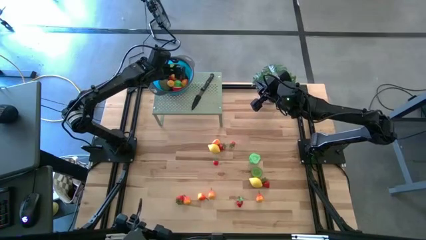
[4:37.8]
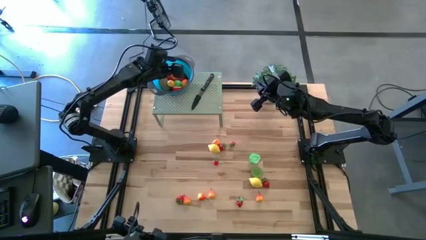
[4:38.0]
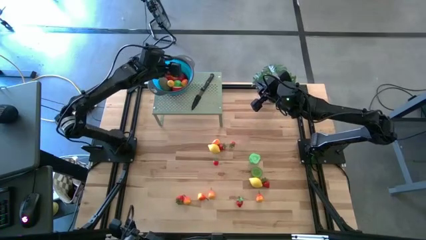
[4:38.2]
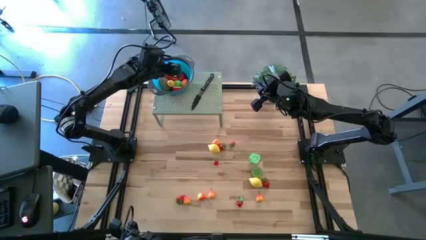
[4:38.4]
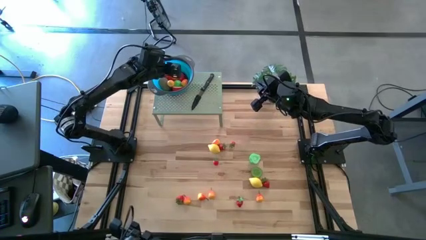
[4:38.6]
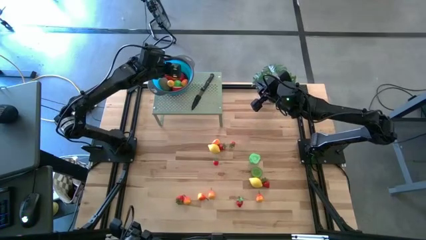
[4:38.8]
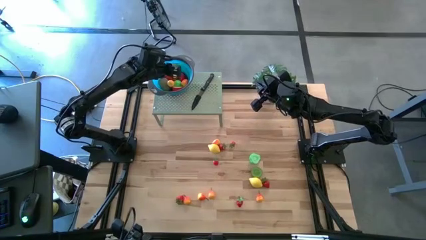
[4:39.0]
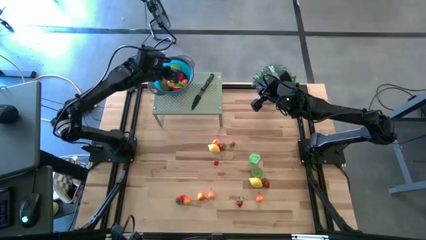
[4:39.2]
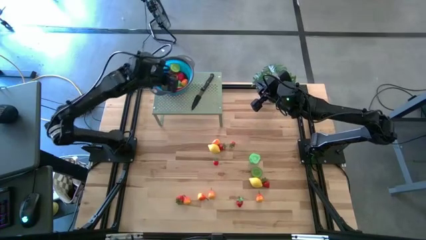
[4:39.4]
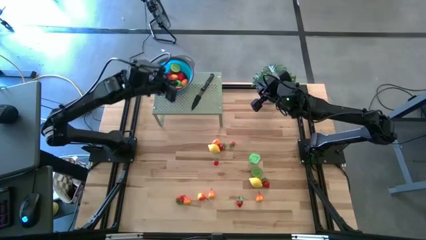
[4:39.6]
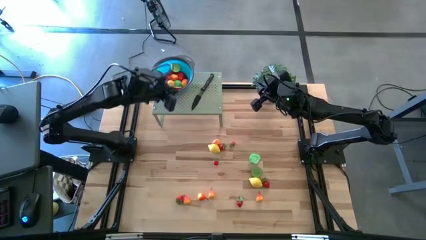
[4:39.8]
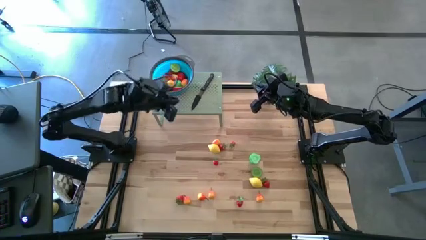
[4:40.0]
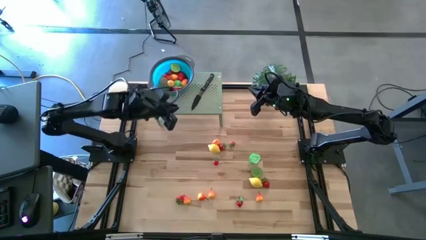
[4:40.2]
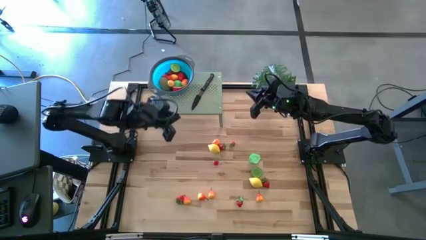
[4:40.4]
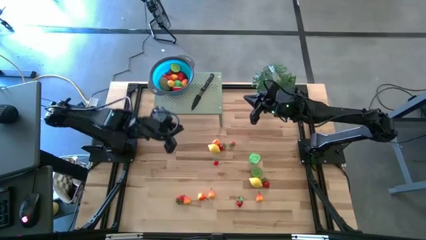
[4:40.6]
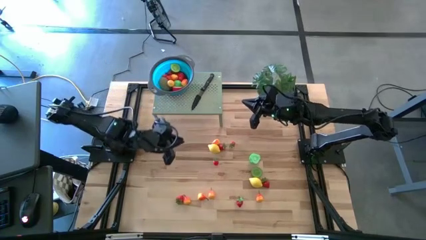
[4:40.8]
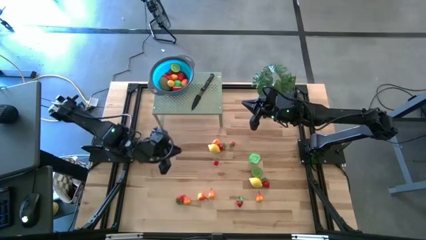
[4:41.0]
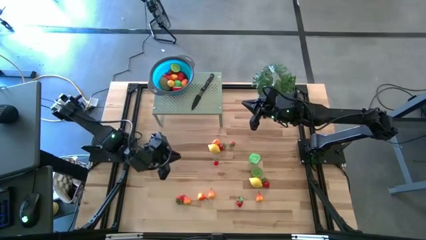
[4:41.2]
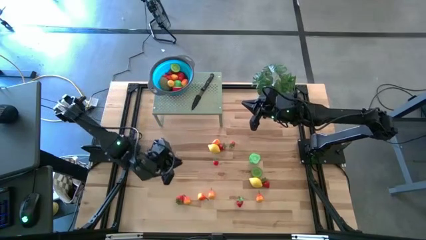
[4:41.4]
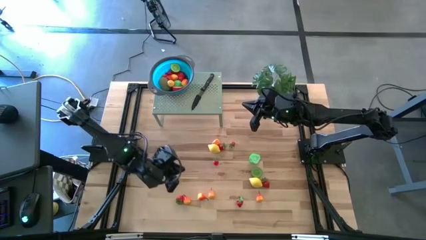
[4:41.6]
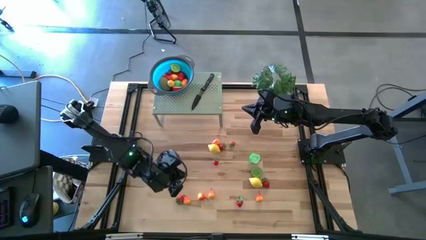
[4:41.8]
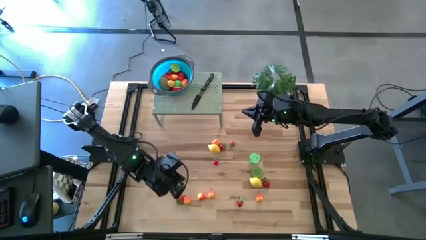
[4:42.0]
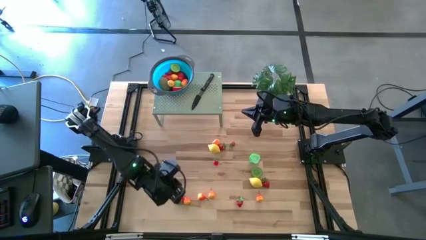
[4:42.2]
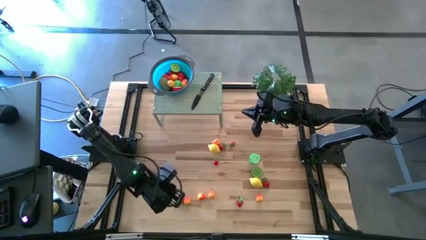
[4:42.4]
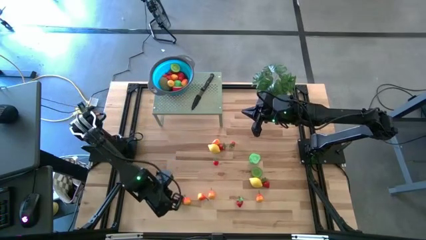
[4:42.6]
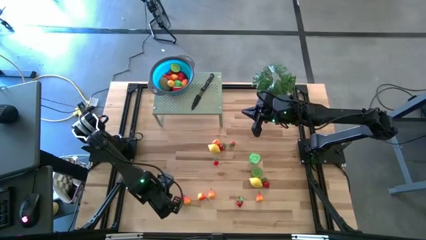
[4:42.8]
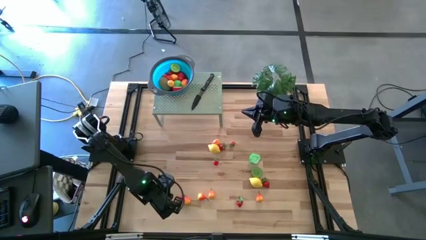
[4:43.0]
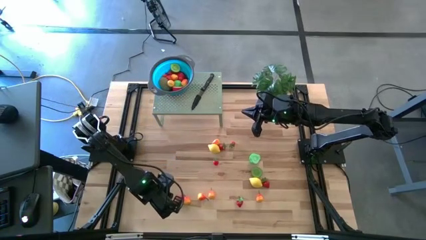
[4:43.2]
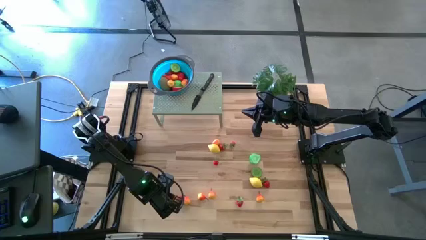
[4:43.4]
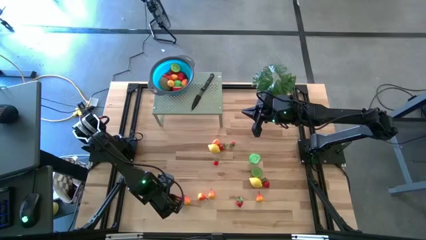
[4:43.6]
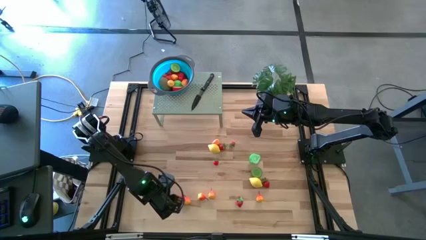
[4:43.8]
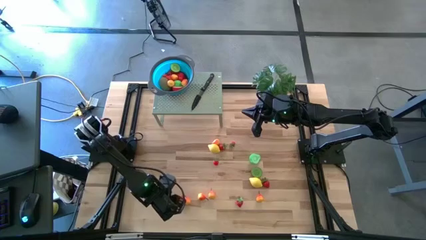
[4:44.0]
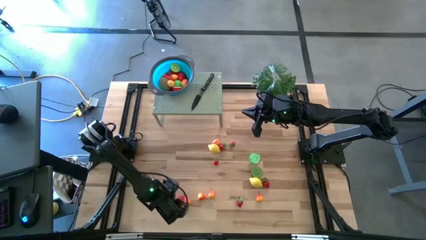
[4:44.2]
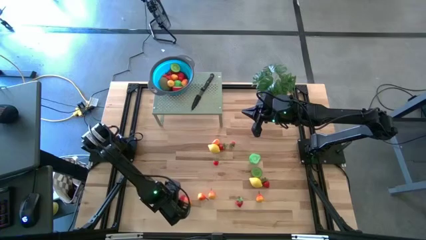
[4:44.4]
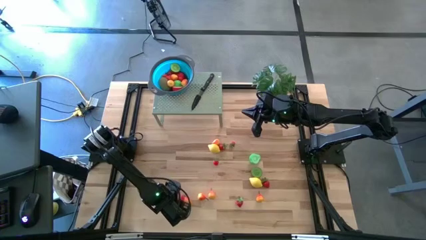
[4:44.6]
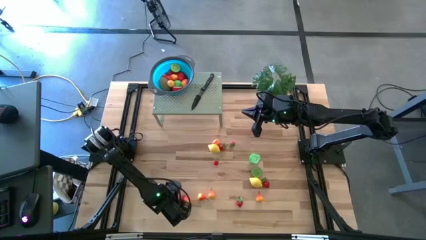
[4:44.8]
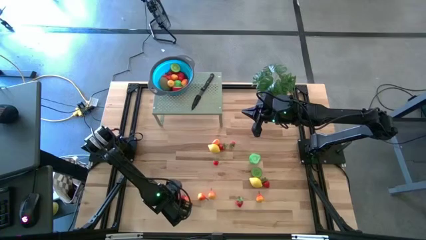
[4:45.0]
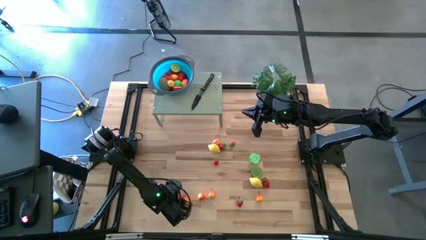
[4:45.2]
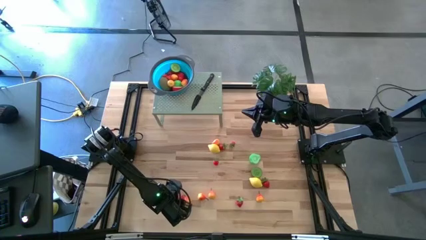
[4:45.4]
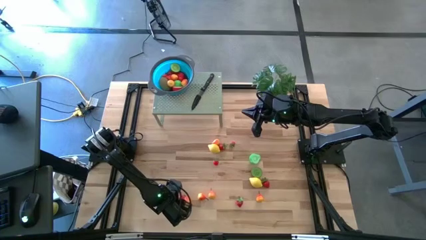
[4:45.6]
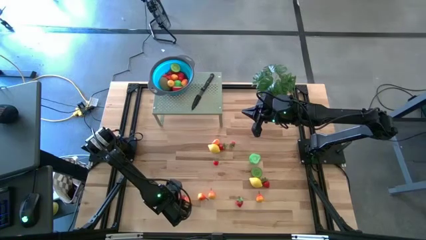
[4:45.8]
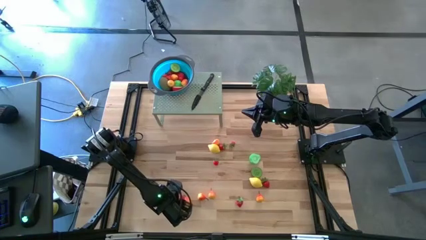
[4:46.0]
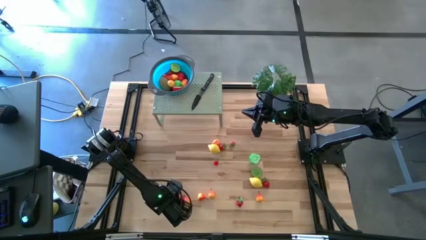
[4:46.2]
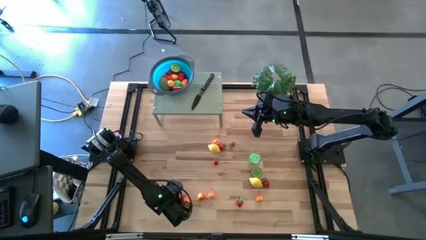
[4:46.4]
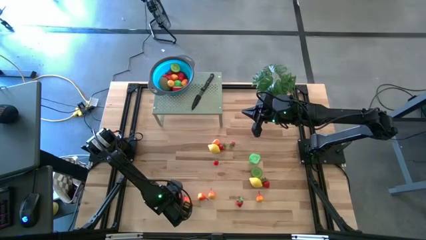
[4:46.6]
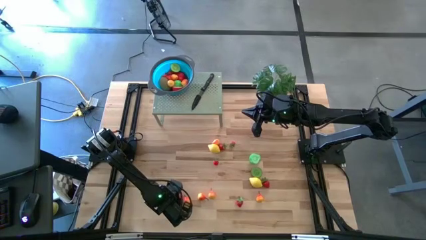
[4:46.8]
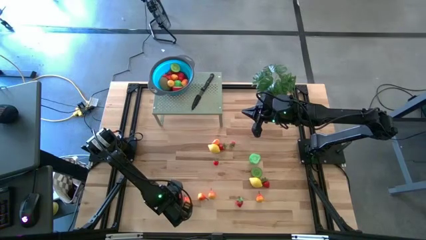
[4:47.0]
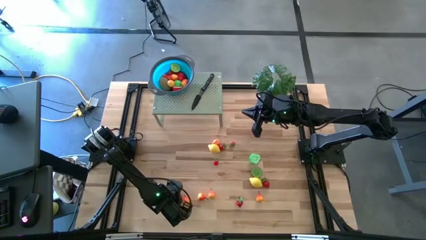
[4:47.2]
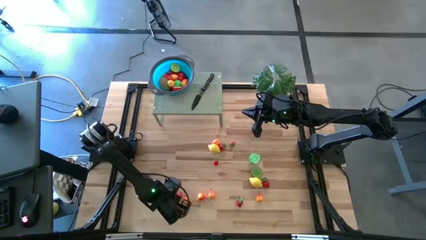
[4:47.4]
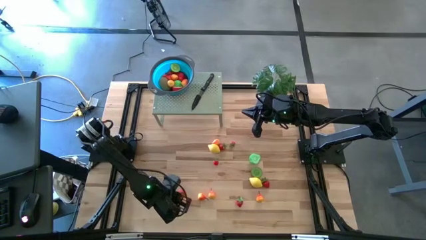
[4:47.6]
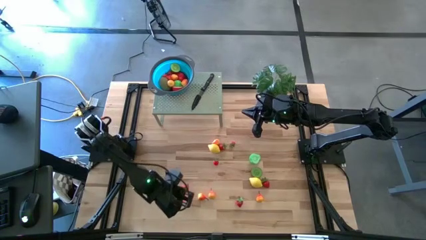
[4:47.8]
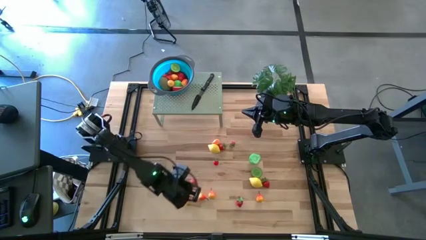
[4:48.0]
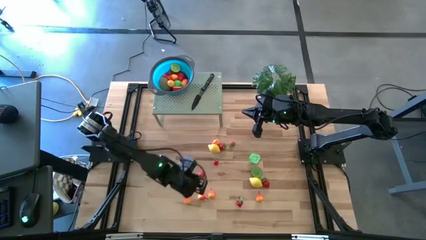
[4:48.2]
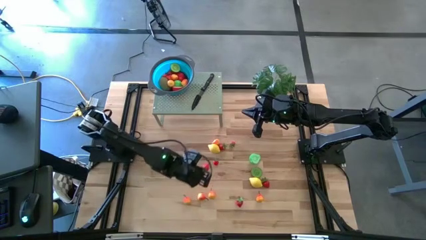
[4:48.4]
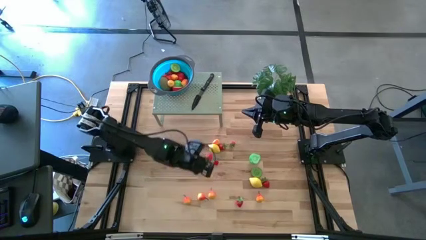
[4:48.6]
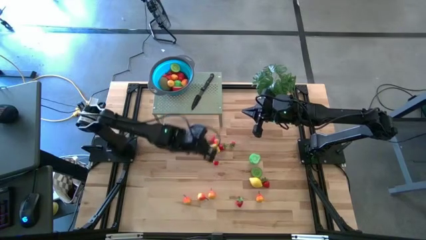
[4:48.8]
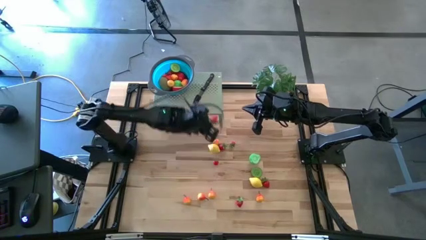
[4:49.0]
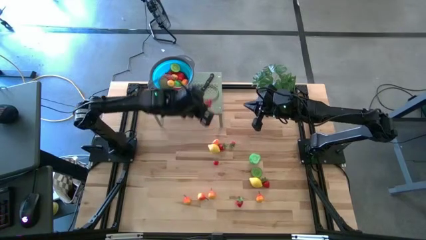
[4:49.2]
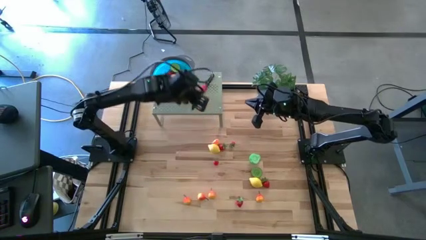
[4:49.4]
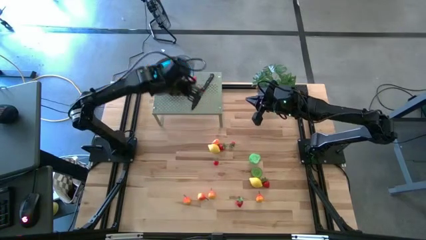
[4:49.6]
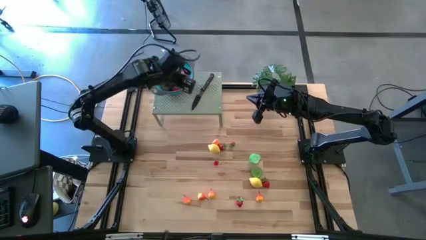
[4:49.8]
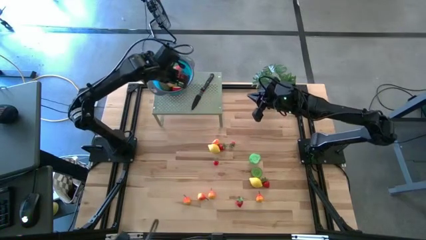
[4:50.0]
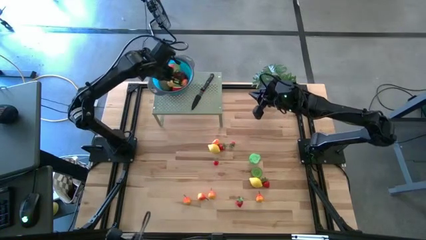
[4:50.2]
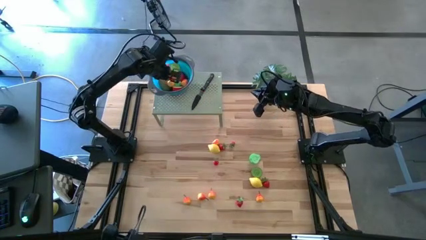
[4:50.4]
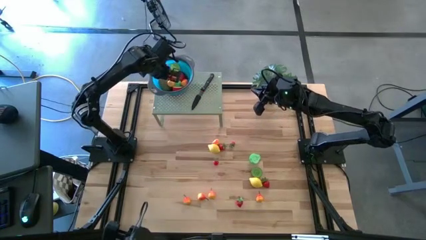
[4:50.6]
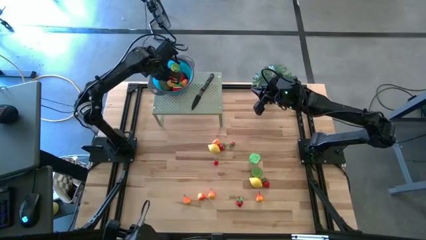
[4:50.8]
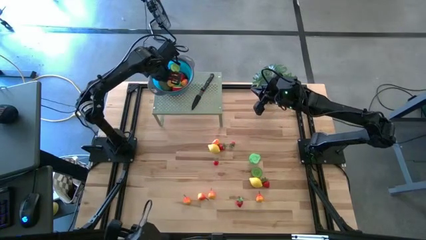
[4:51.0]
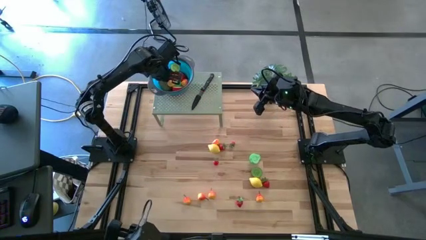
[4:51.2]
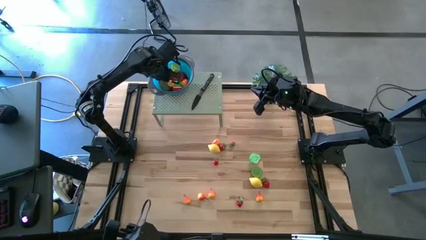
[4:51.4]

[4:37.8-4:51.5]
Task: Pick & Place Fruit
Put the strawberry into the strainer bowl on the shelf

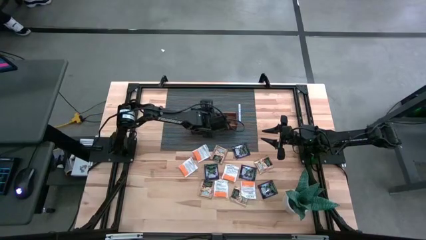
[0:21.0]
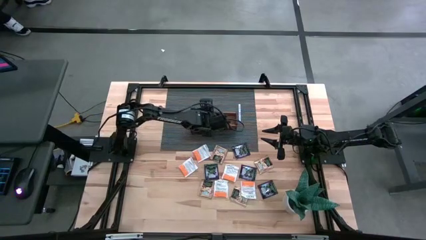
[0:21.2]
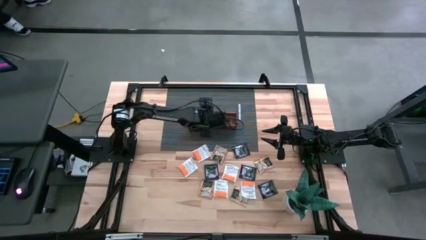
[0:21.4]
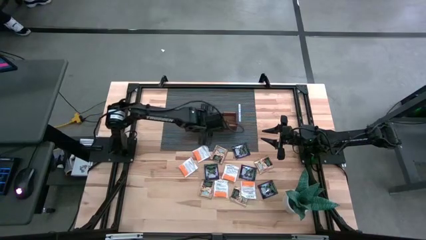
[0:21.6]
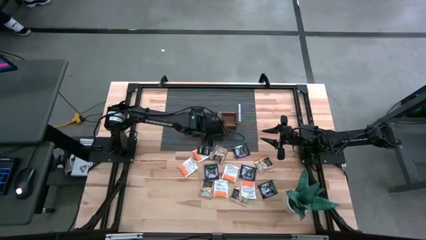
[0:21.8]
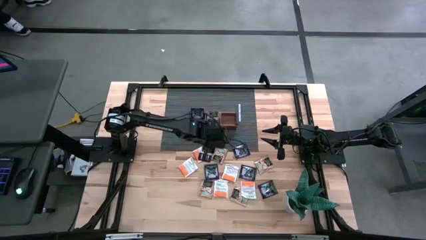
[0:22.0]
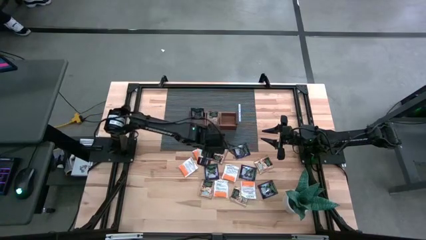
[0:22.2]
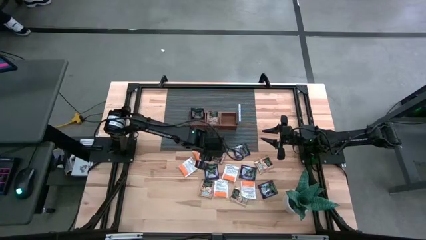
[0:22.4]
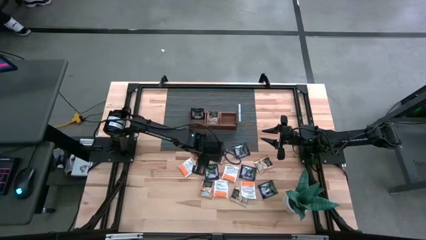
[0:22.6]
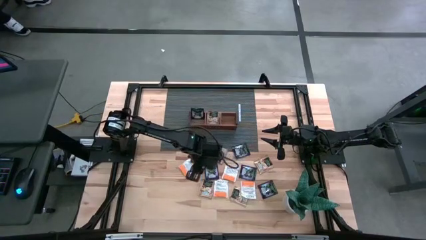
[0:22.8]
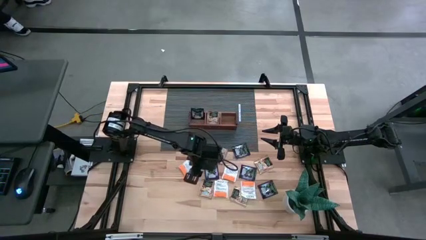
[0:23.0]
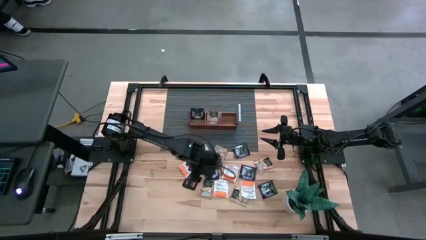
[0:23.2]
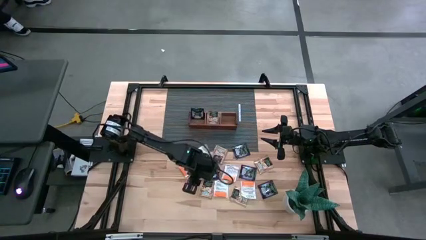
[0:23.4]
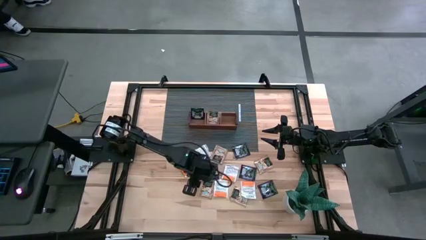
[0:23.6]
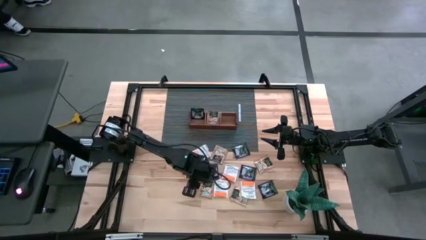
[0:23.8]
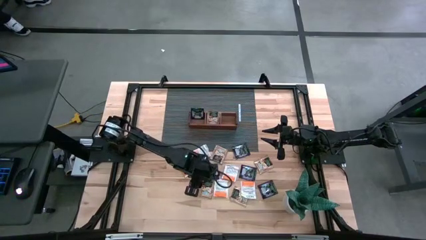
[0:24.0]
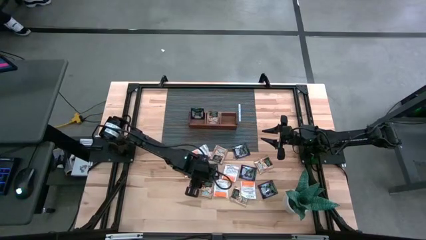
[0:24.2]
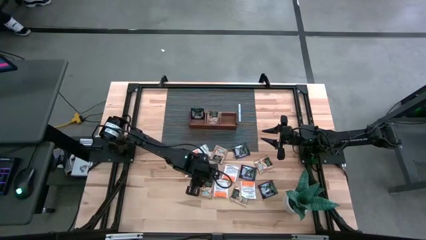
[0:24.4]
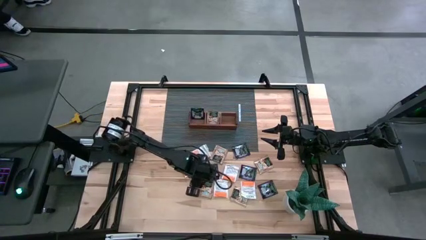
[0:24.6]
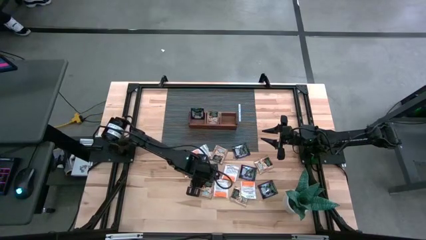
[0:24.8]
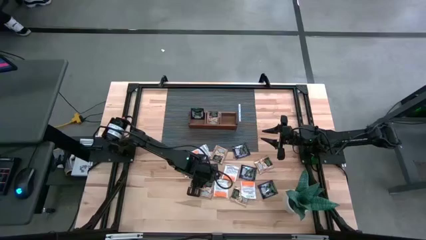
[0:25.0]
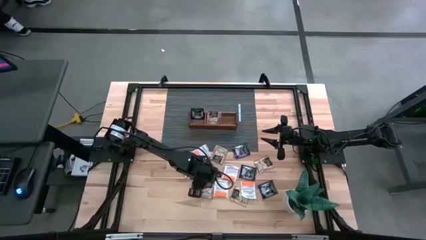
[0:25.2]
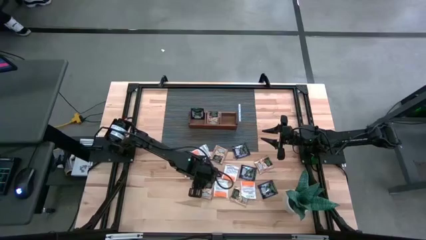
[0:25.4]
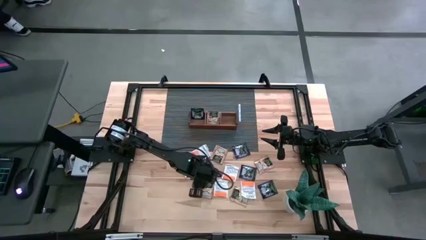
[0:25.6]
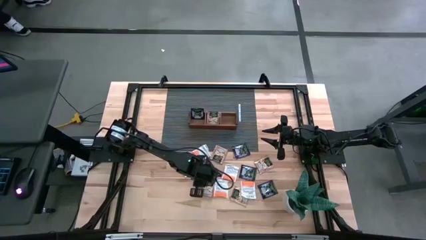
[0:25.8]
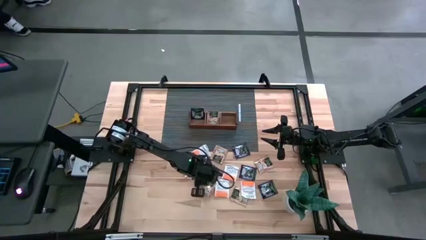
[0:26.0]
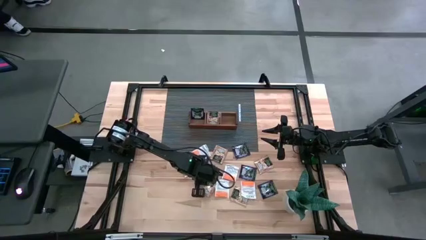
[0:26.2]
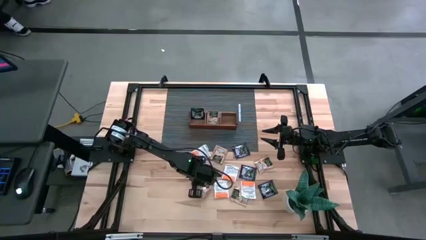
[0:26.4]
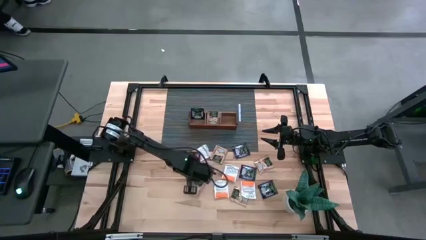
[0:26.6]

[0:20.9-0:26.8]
Task: Pick & Place Tea
Put the brown tea bag into the middle section of the wooden organizer
